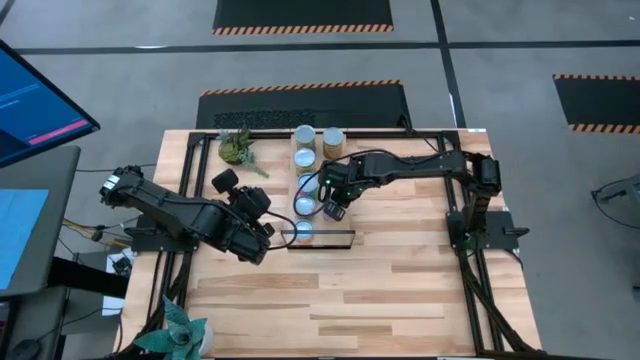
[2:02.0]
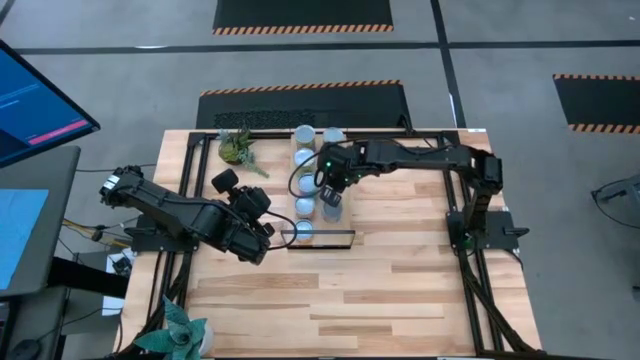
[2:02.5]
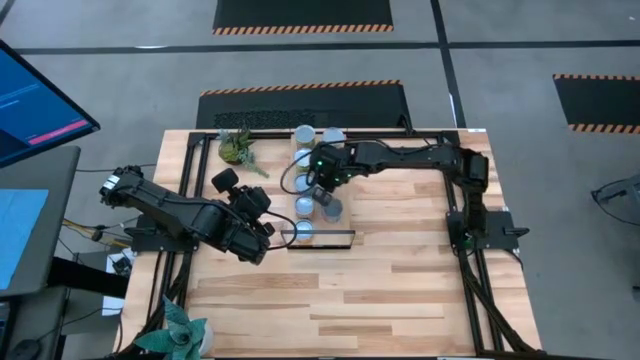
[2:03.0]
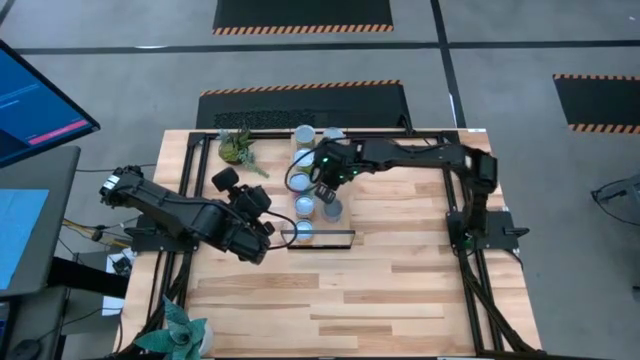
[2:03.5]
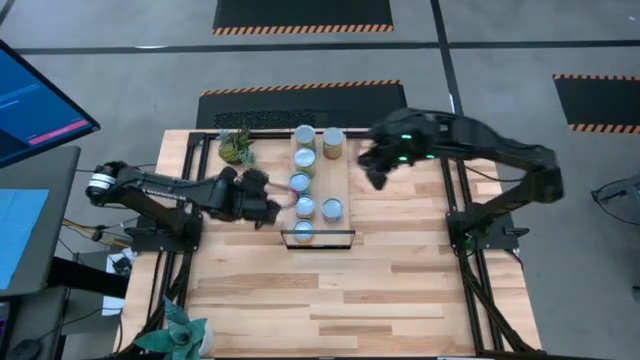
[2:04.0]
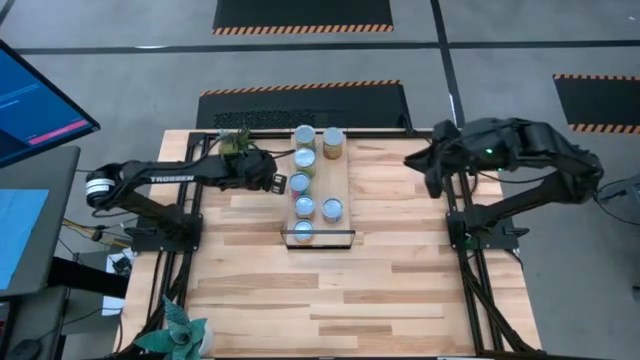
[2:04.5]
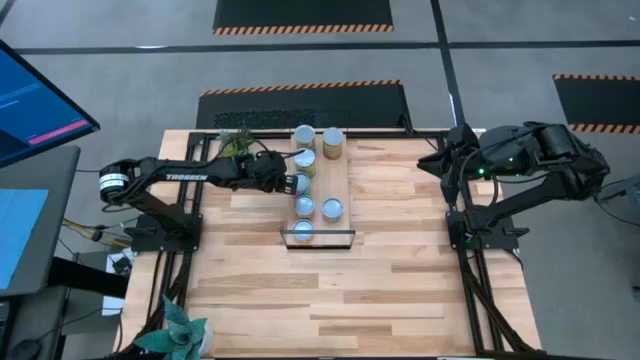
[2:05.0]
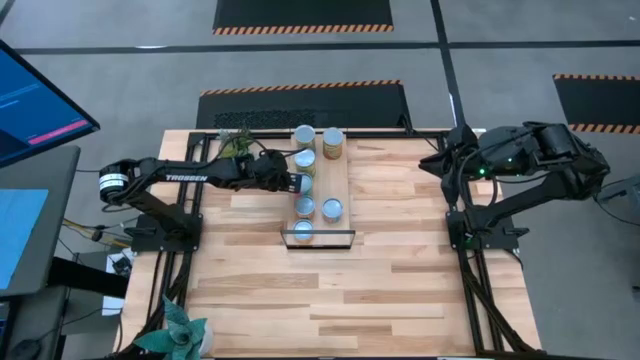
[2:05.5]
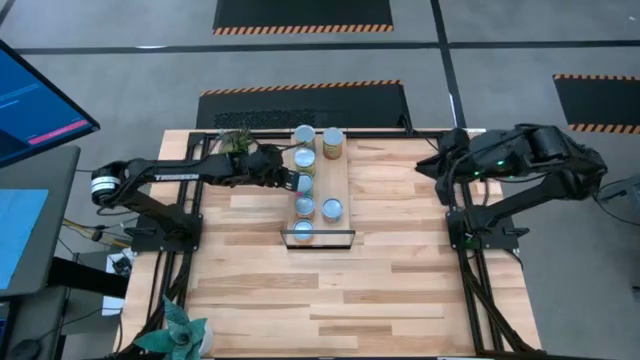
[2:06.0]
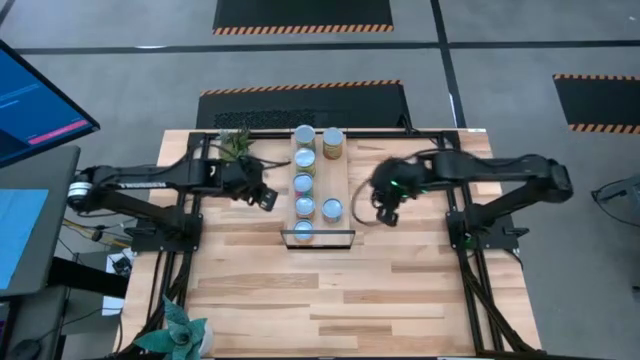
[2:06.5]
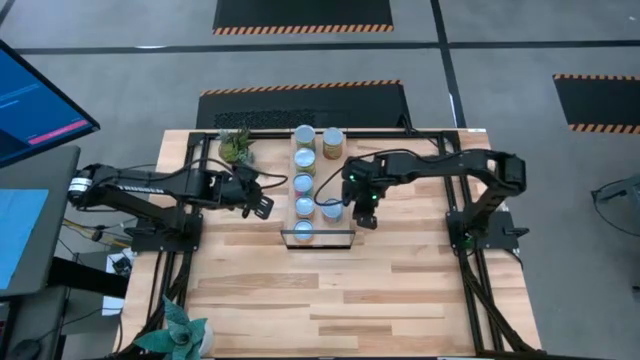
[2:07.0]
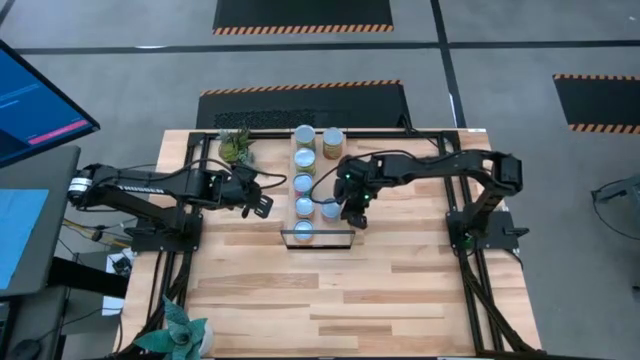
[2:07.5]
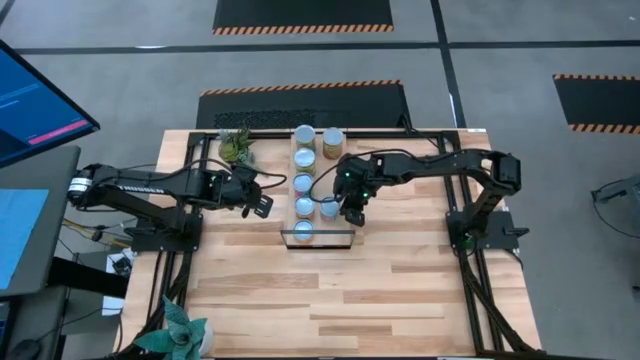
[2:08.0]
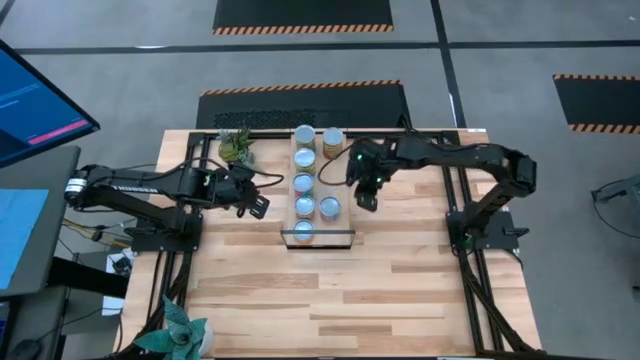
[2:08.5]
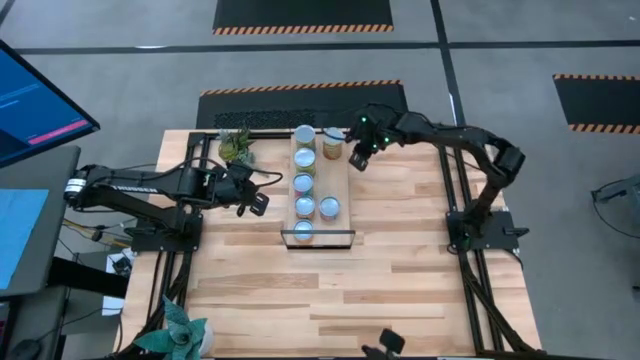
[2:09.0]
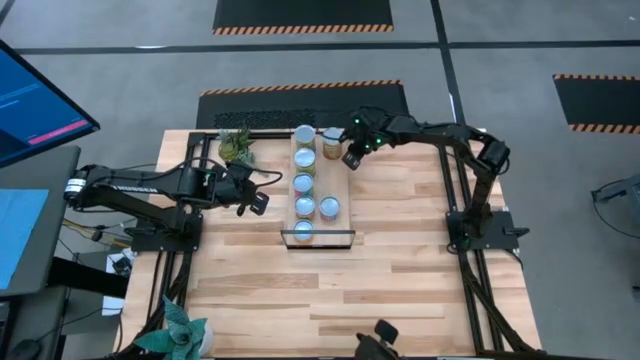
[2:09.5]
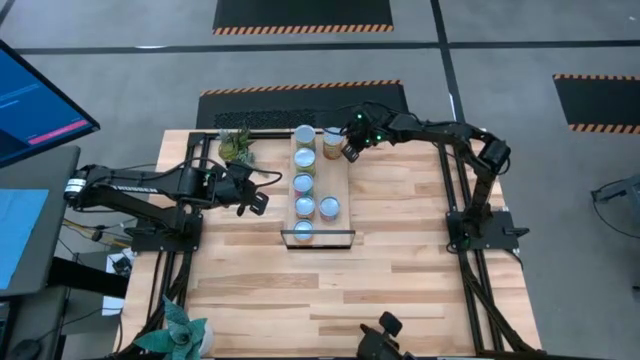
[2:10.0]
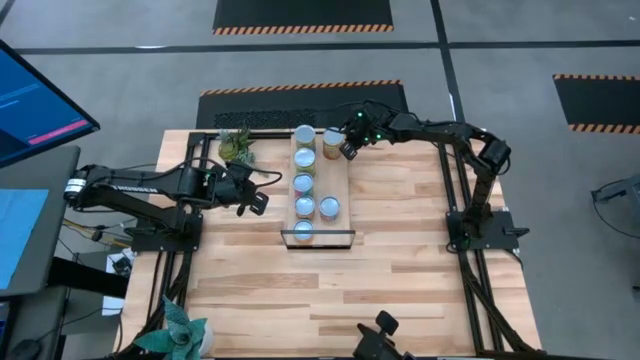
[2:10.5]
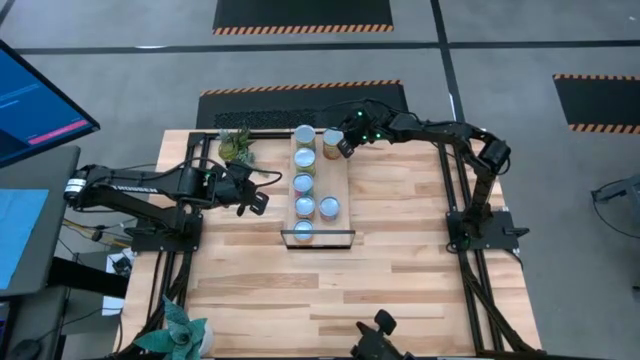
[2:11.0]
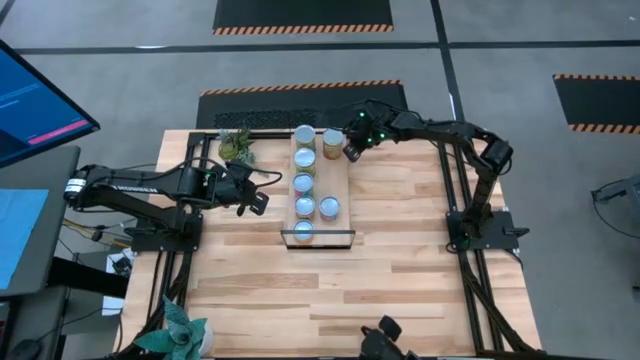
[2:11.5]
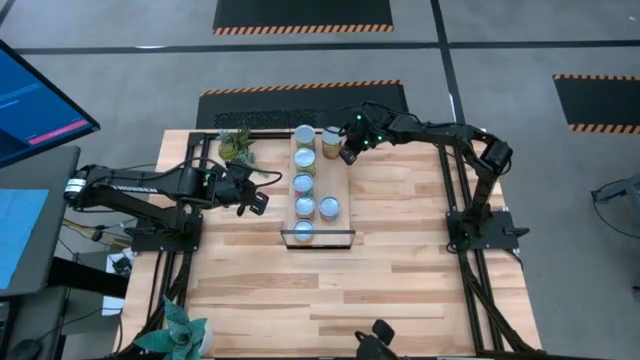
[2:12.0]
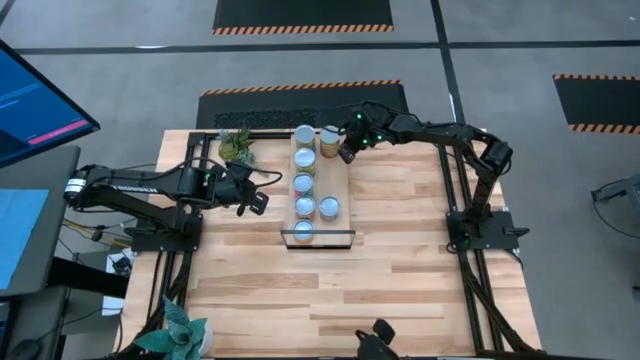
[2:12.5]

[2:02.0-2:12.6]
Task: Pick and place cans onto a shelf
Adjust the cans on the shelf

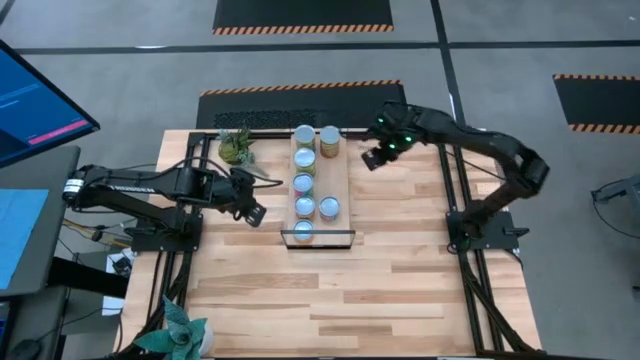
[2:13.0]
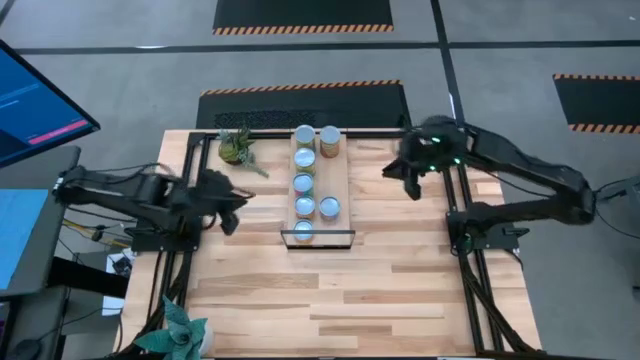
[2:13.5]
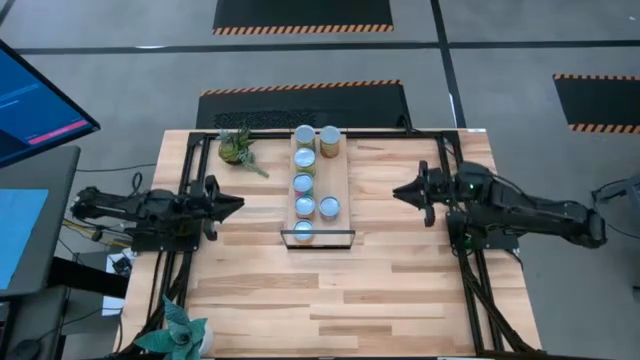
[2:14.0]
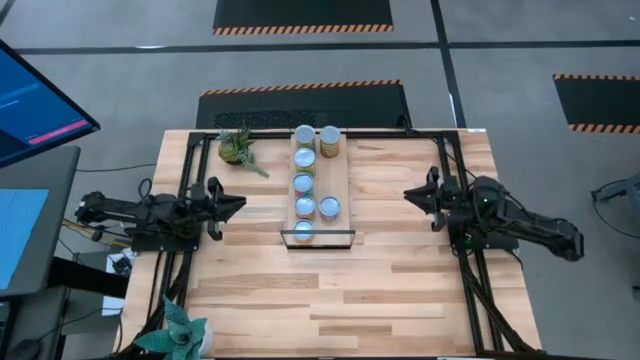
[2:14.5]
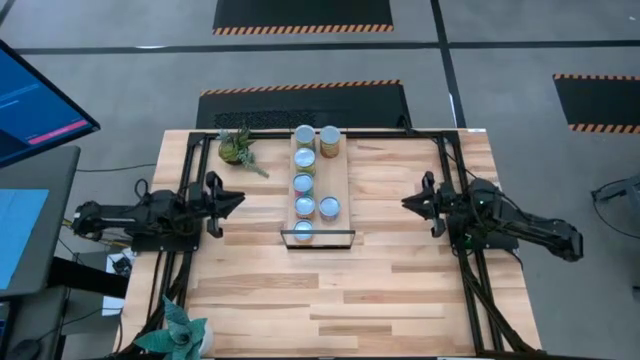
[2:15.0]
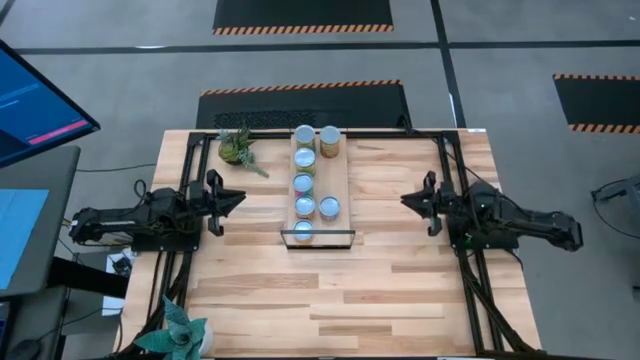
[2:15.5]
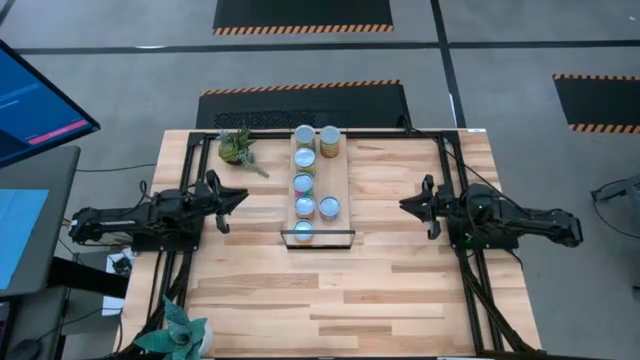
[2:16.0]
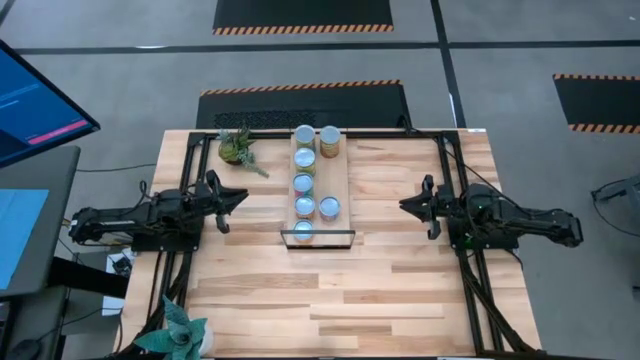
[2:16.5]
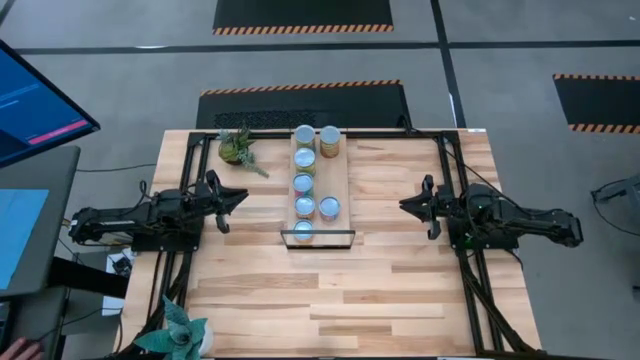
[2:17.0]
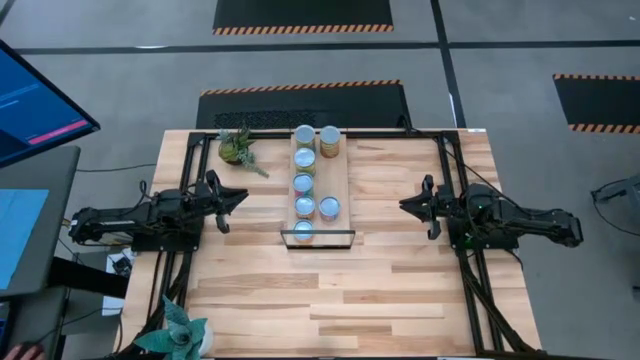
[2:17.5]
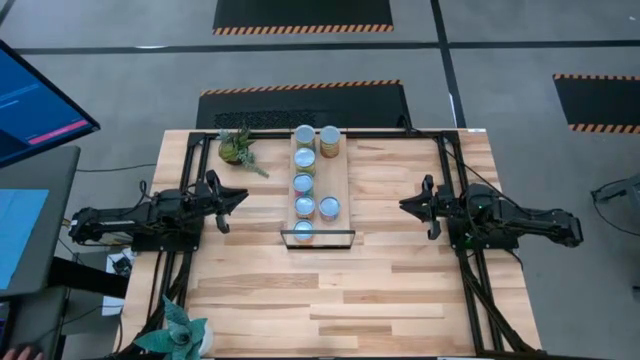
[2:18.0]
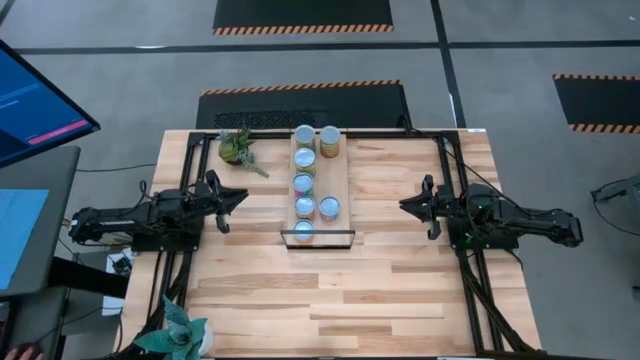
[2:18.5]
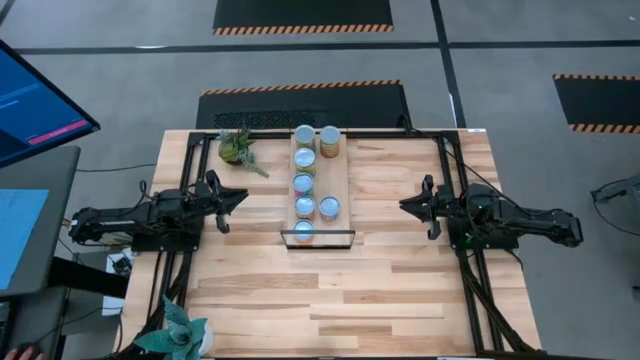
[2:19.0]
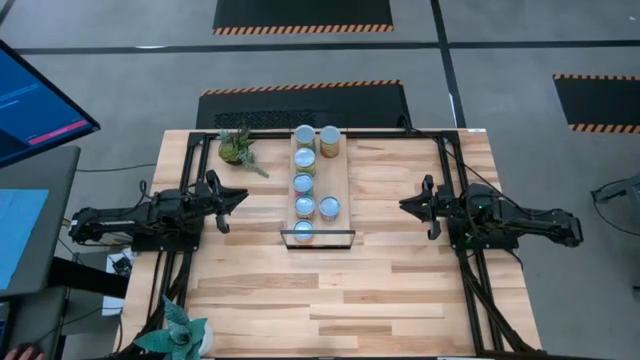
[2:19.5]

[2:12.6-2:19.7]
Return to Home Position

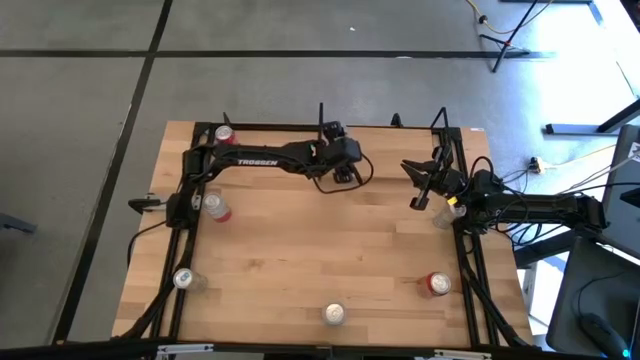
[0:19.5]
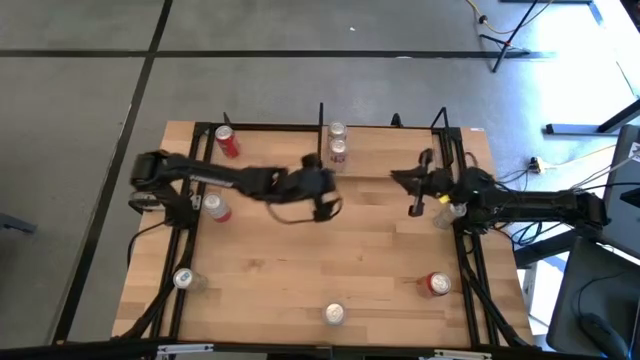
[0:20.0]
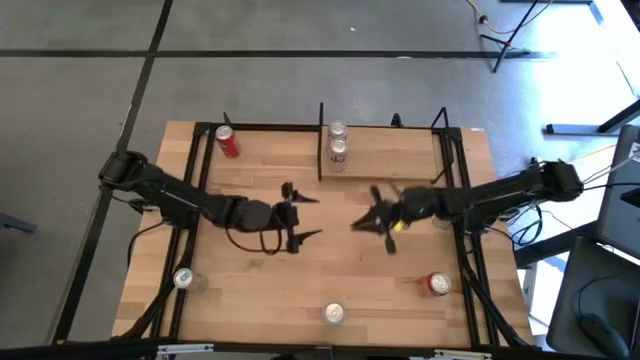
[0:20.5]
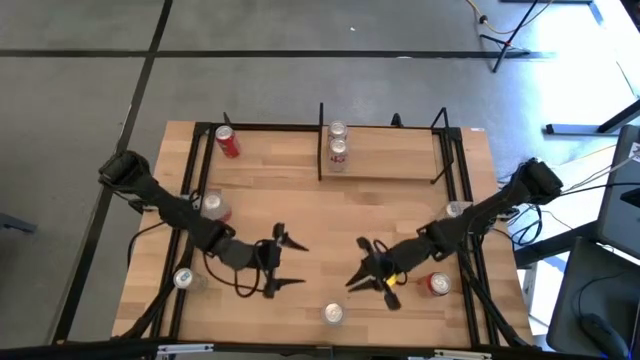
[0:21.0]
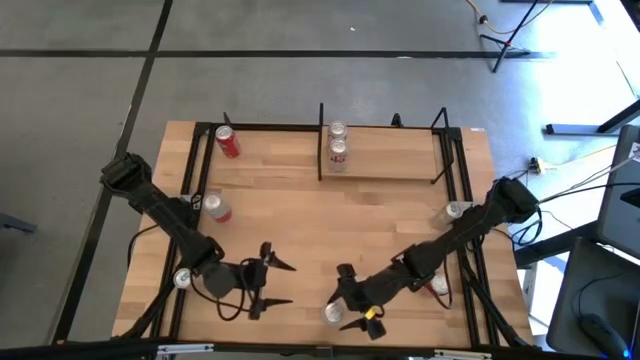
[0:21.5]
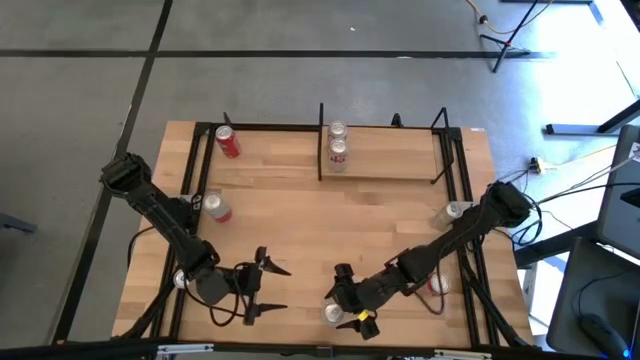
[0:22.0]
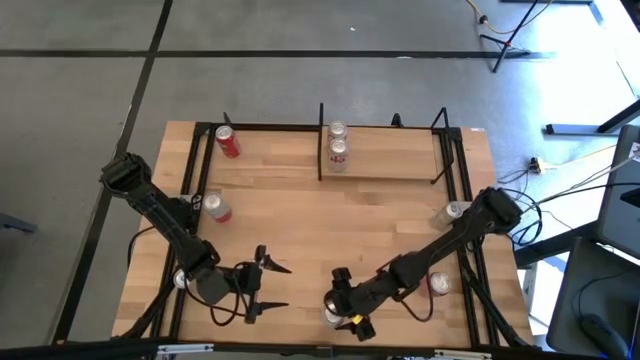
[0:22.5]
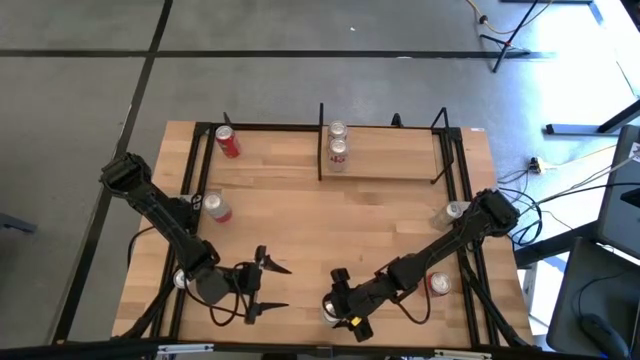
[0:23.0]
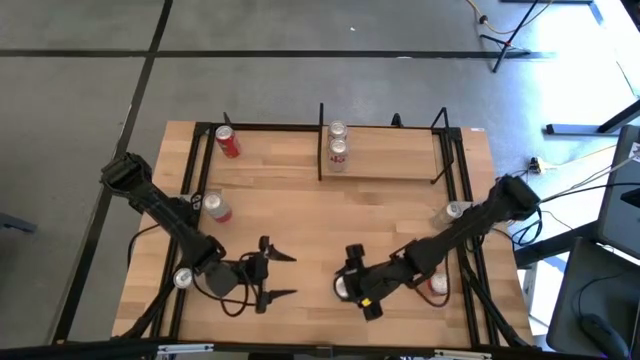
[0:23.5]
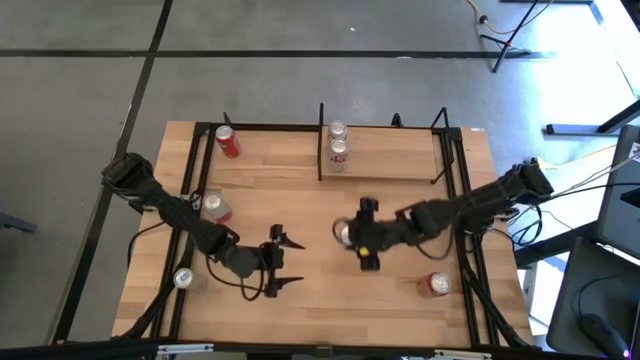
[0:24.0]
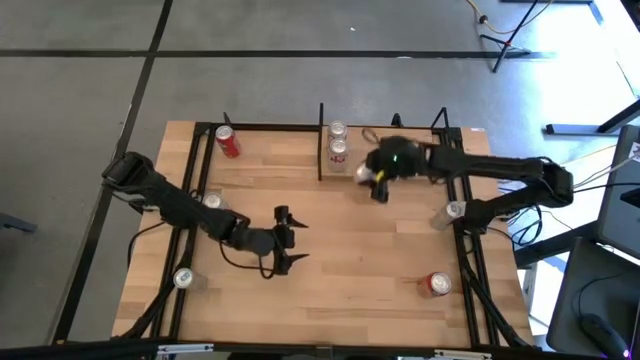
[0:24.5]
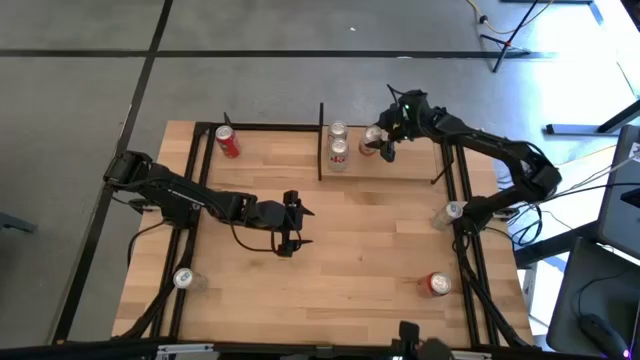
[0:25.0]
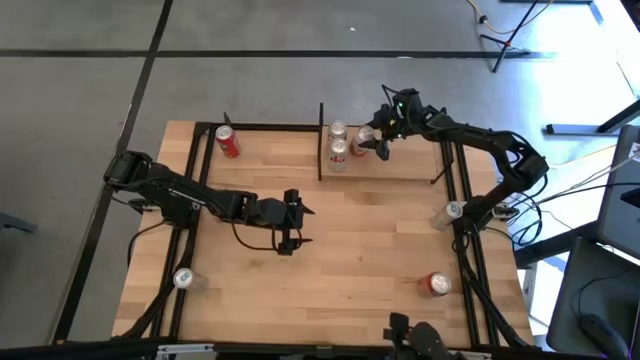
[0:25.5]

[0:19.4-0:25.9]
Task: Place canned beverage on shelf
Put the bottom pink white soda can on the shelf
